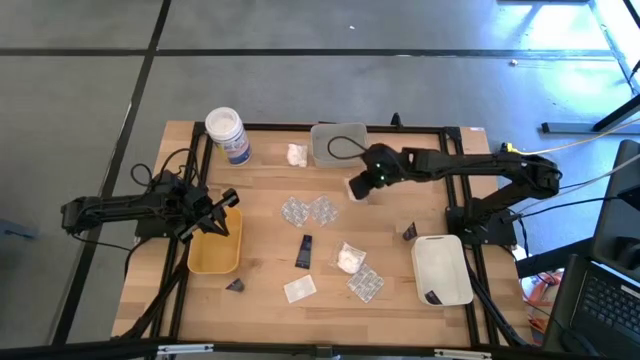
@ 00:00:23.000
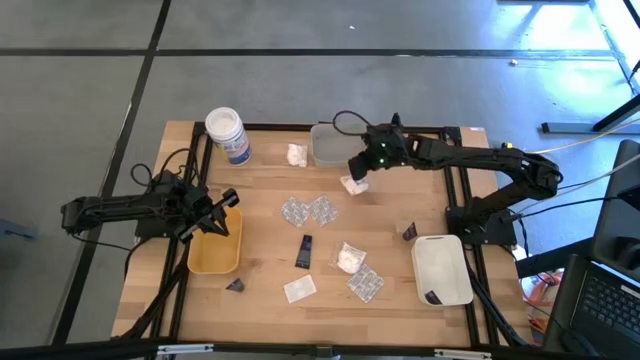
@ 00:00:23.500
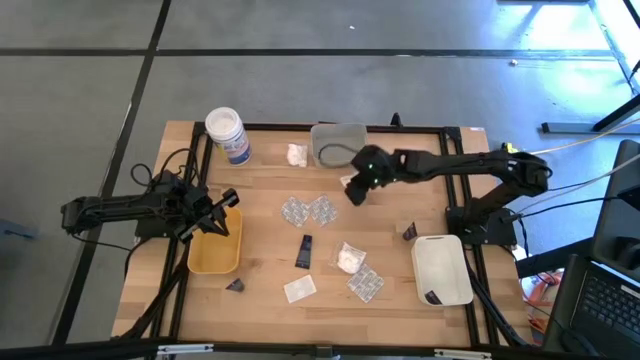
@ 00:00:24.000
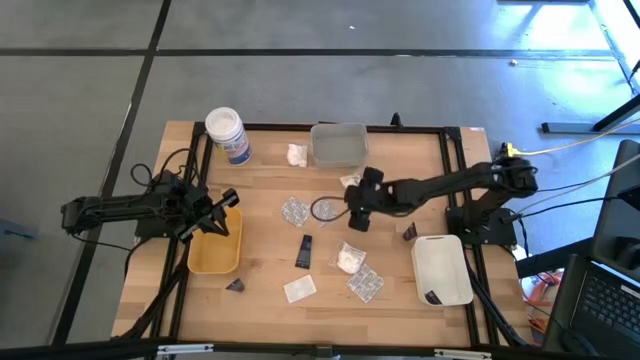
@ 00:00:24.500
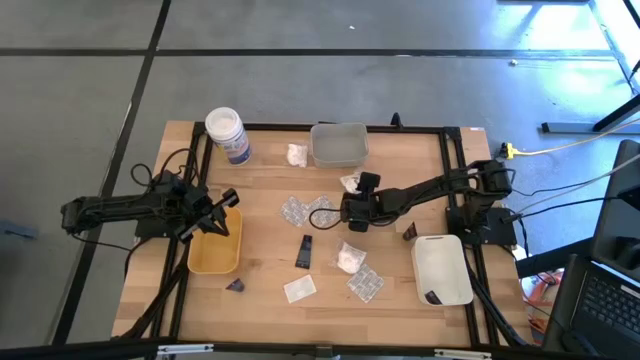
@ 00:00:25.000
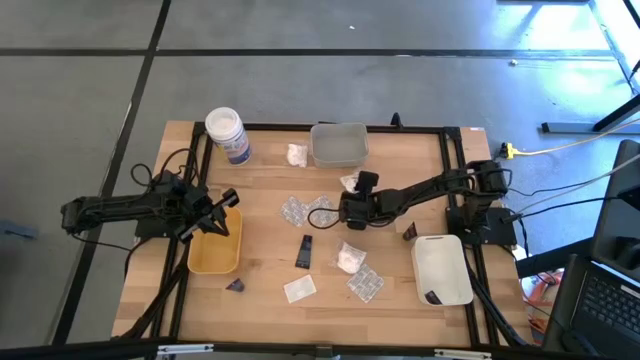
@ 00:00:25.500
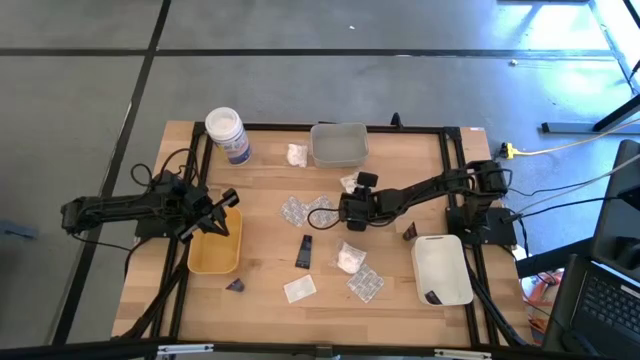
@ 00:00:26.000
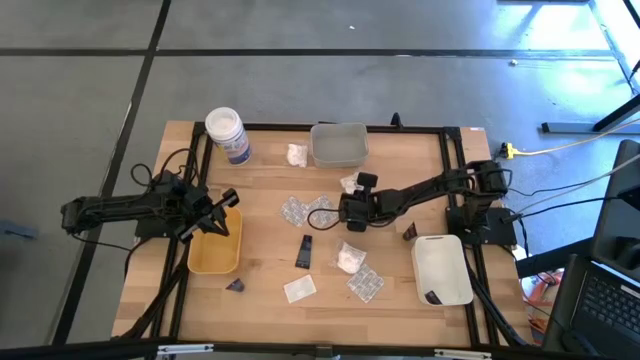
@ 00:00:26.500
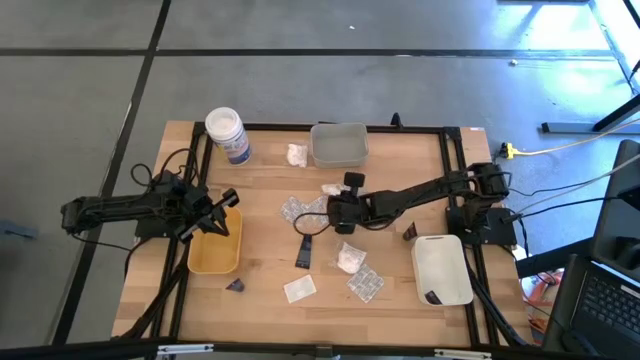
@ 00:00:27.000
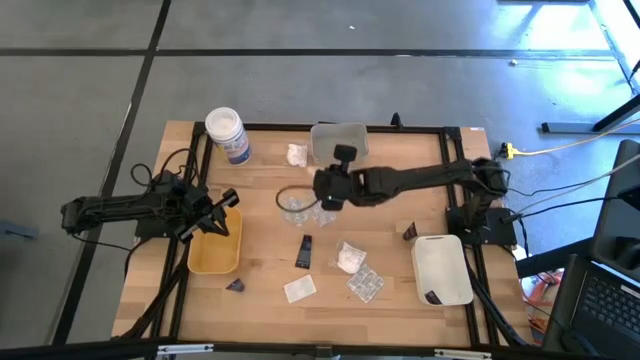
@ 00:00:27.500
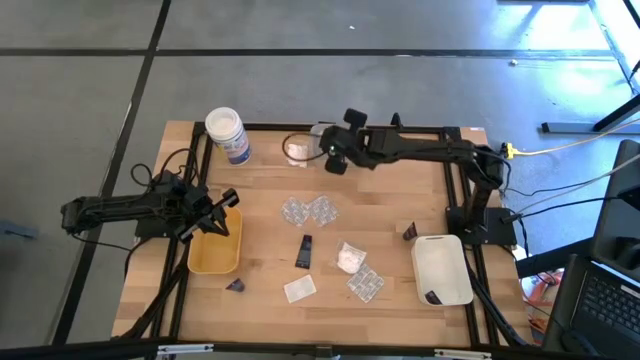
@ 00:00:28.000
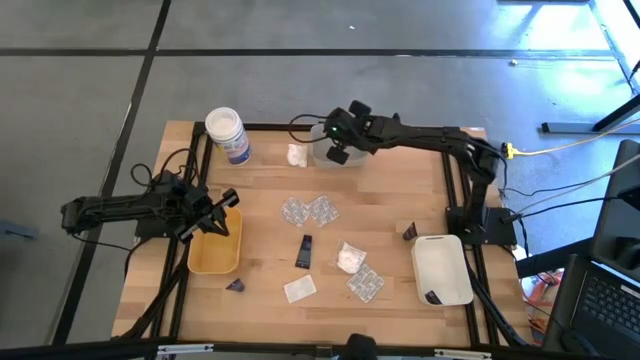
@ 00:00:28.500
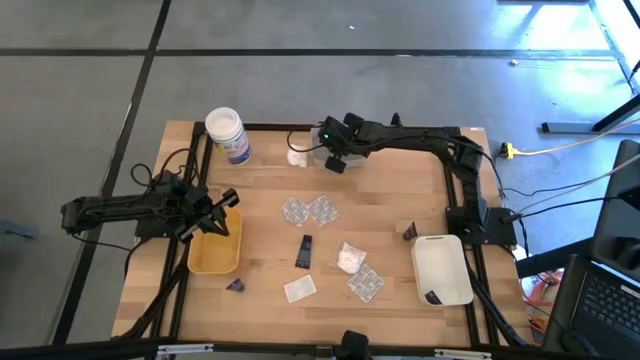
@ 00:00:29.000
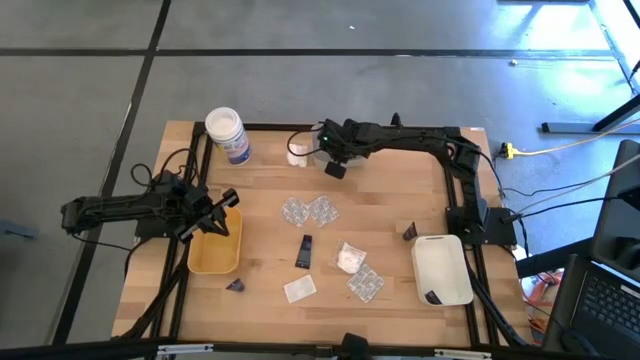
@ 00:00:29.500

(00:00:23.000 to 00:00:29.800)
Task: Pick & Place Travel size toiletries
Put the white cotton pack into the gray bin

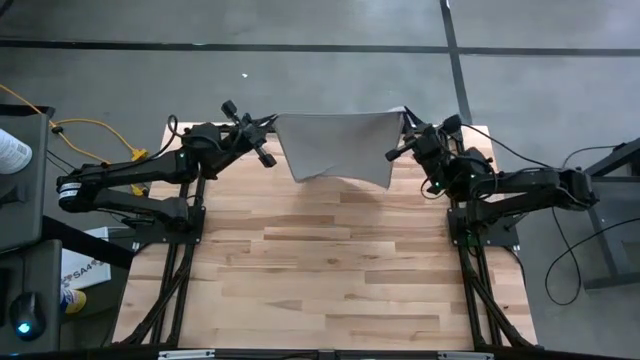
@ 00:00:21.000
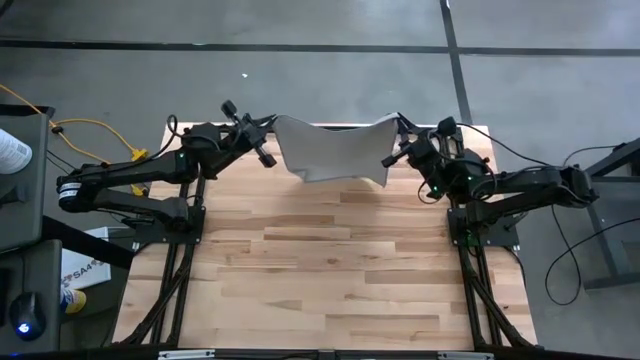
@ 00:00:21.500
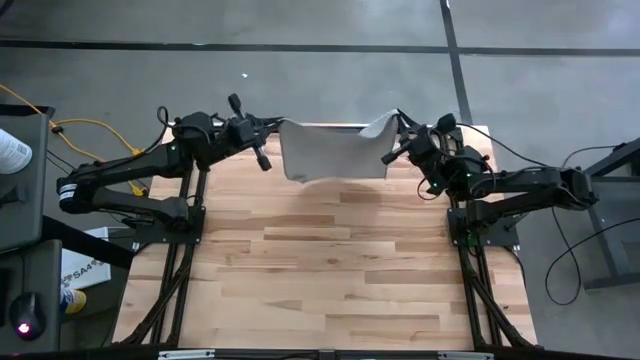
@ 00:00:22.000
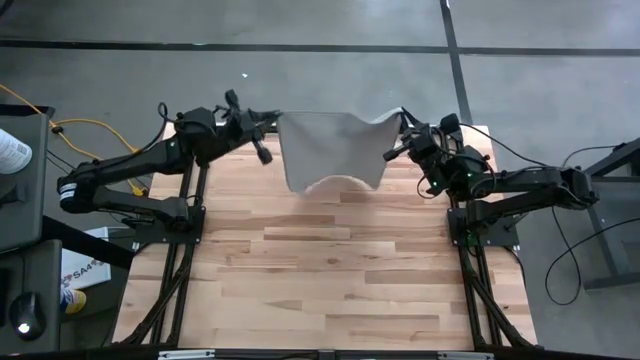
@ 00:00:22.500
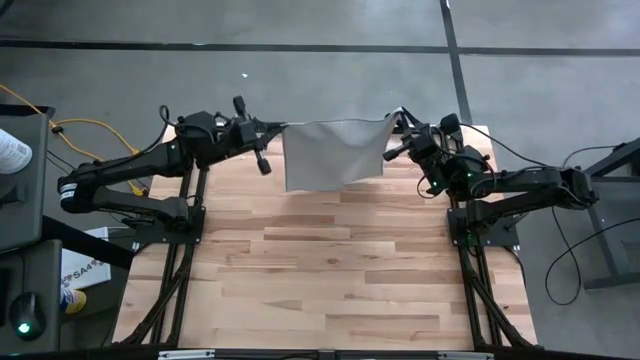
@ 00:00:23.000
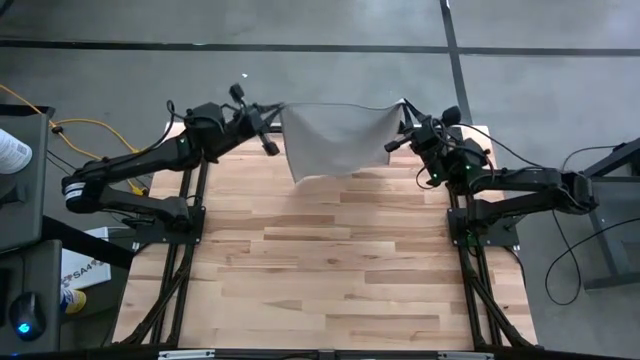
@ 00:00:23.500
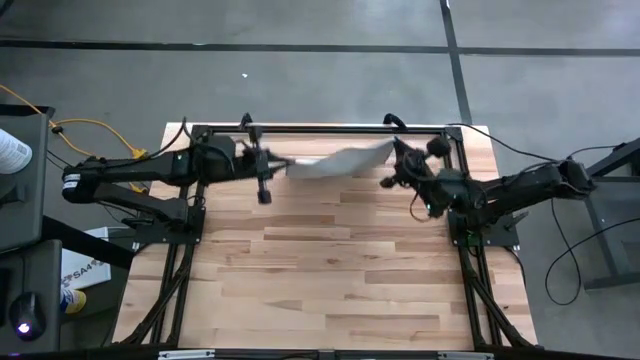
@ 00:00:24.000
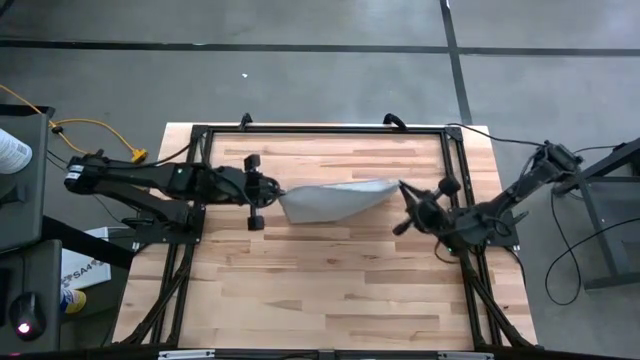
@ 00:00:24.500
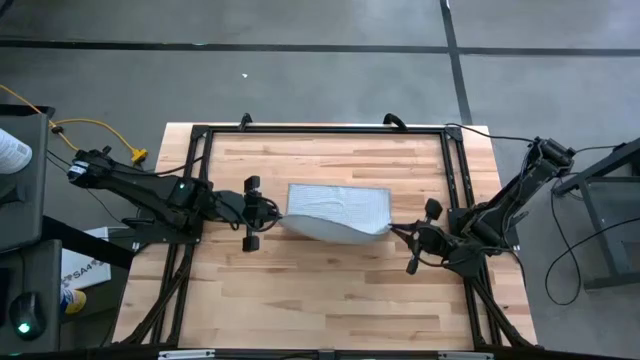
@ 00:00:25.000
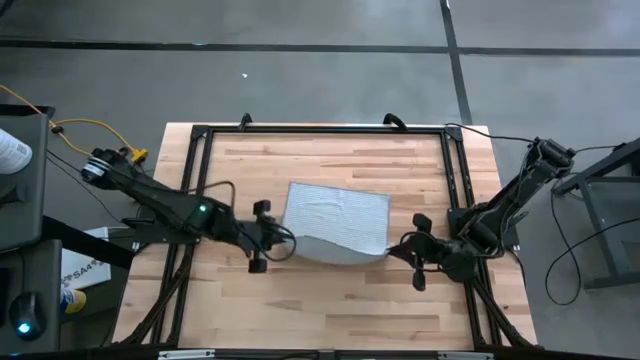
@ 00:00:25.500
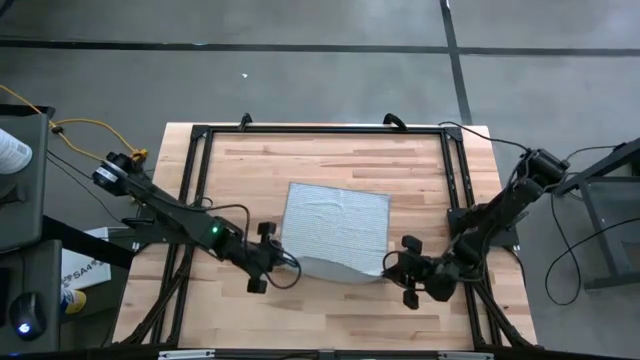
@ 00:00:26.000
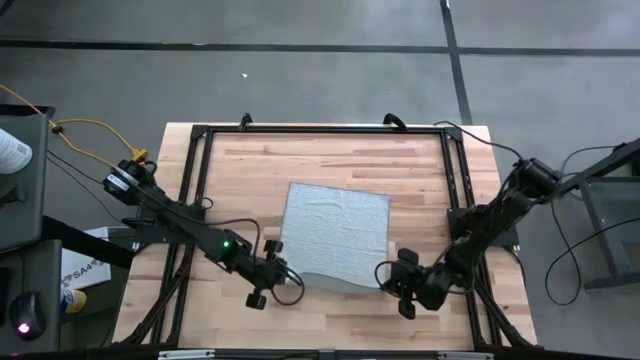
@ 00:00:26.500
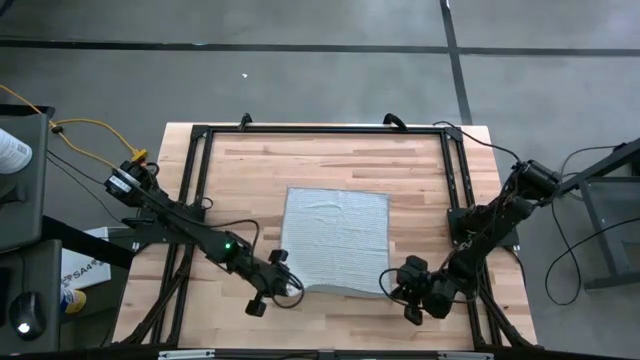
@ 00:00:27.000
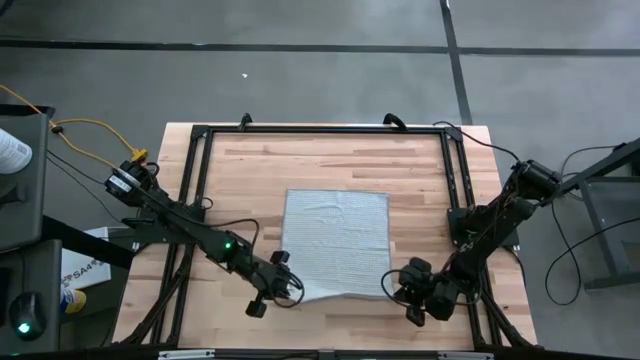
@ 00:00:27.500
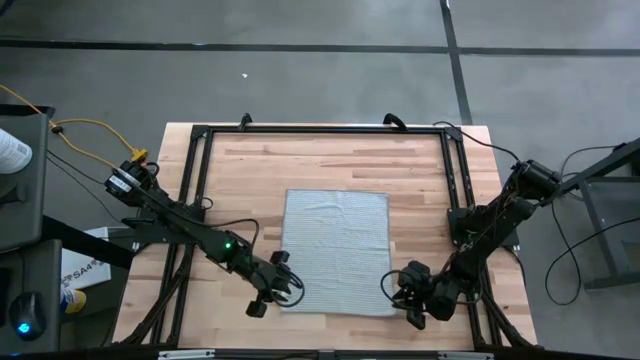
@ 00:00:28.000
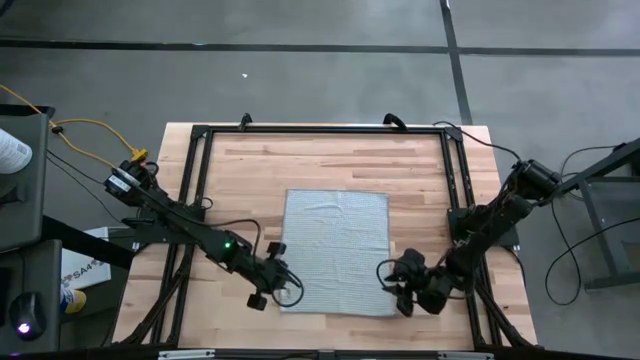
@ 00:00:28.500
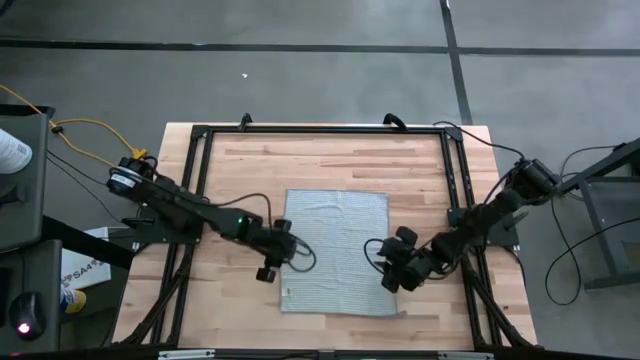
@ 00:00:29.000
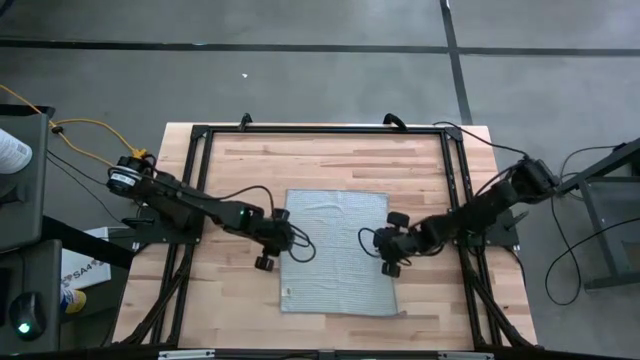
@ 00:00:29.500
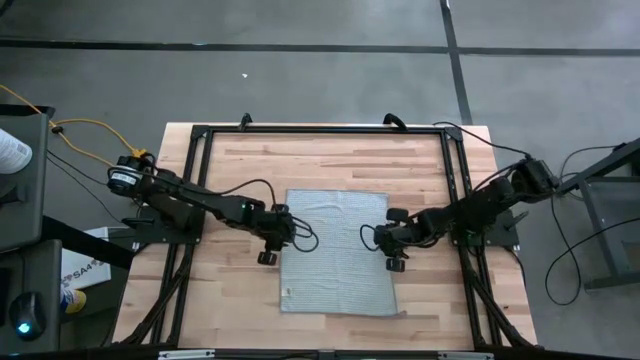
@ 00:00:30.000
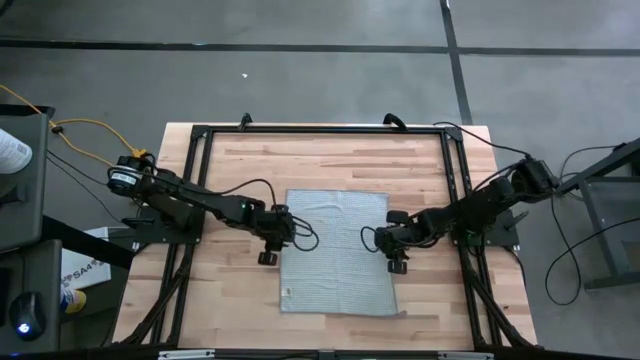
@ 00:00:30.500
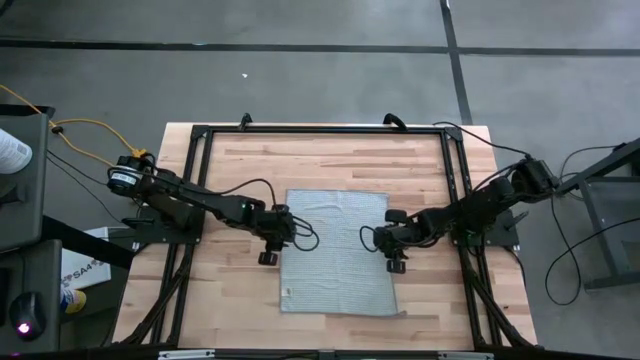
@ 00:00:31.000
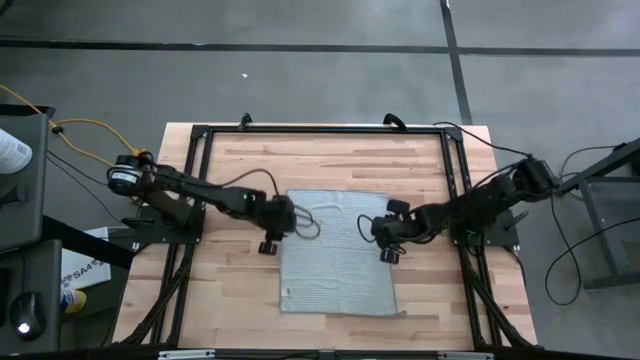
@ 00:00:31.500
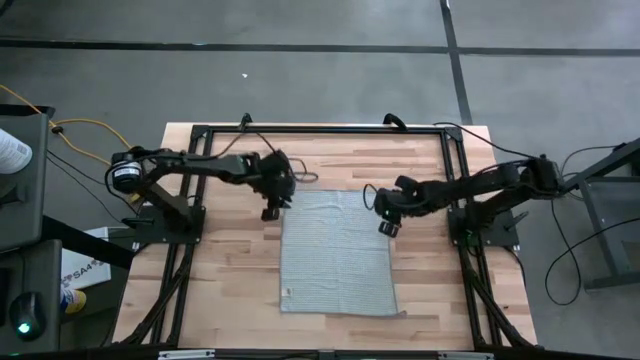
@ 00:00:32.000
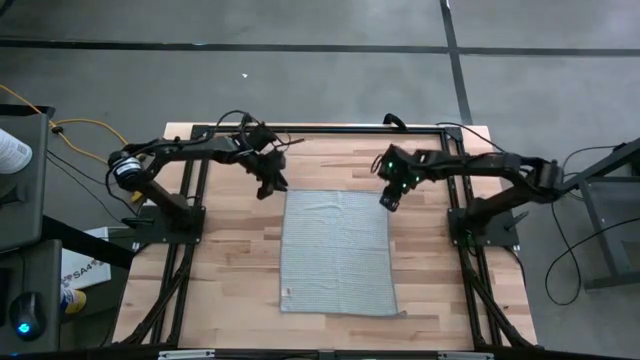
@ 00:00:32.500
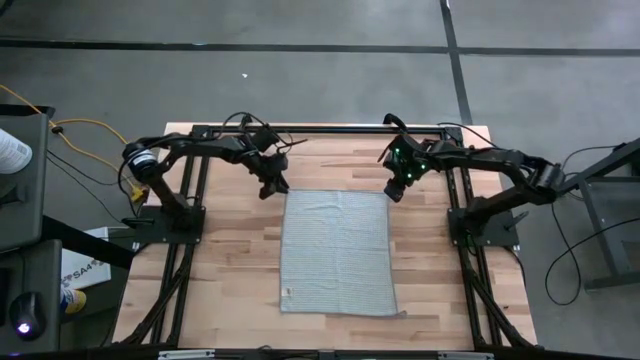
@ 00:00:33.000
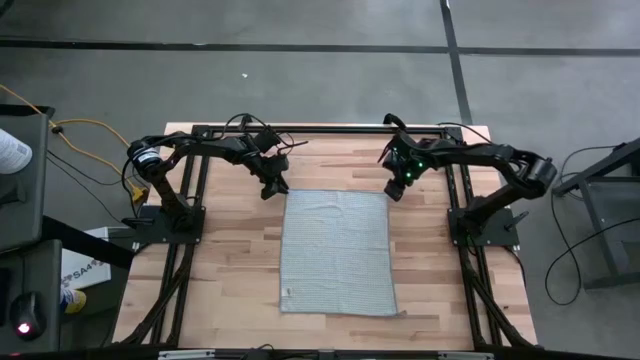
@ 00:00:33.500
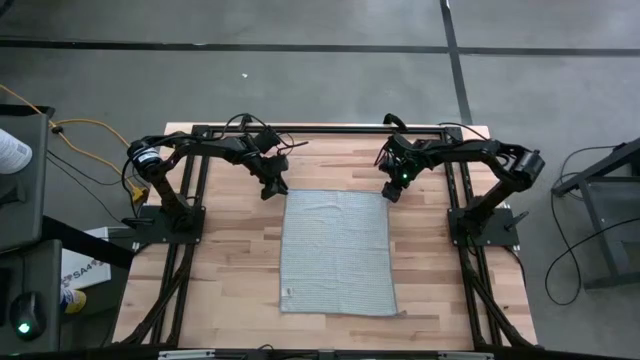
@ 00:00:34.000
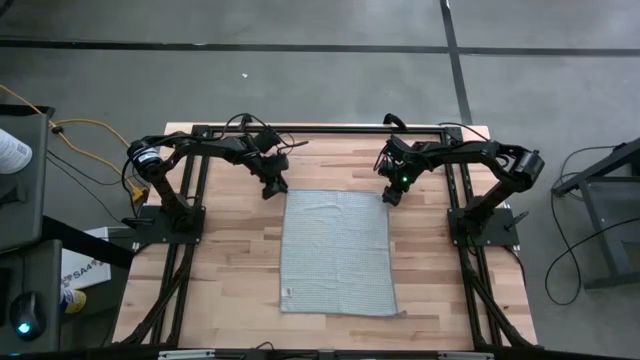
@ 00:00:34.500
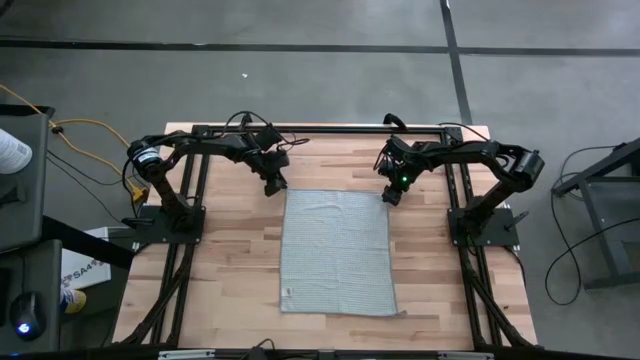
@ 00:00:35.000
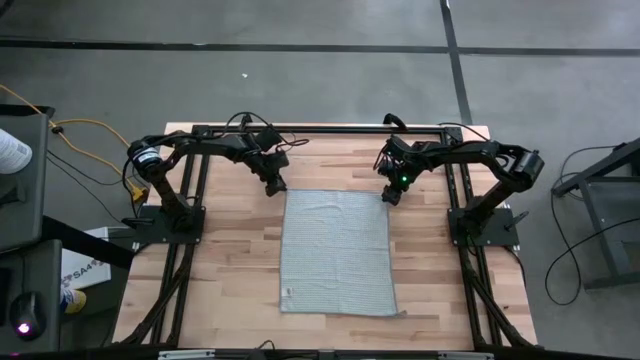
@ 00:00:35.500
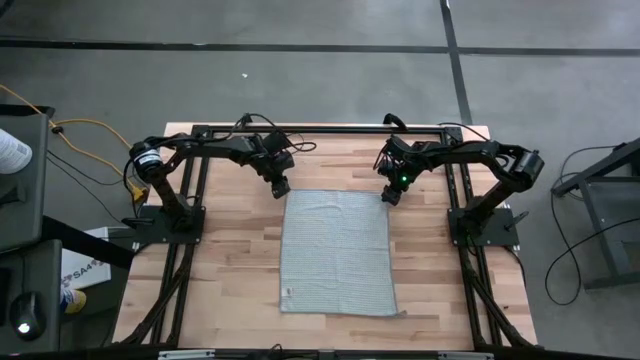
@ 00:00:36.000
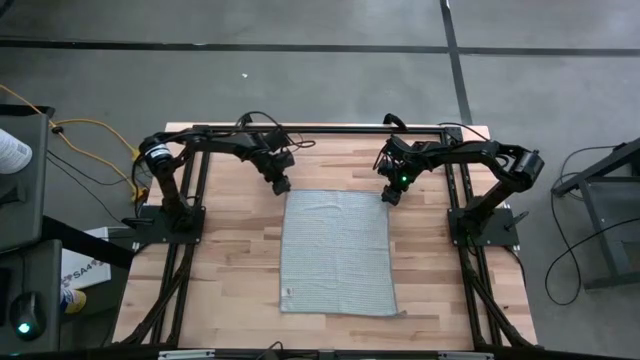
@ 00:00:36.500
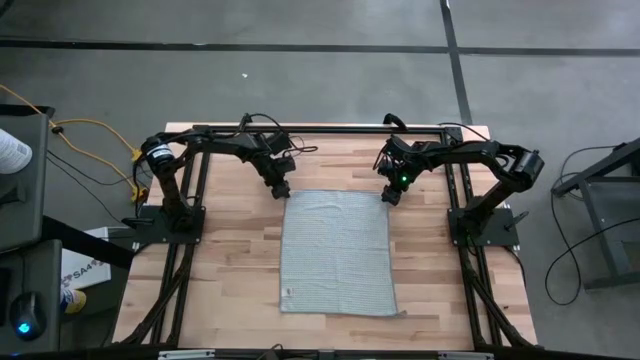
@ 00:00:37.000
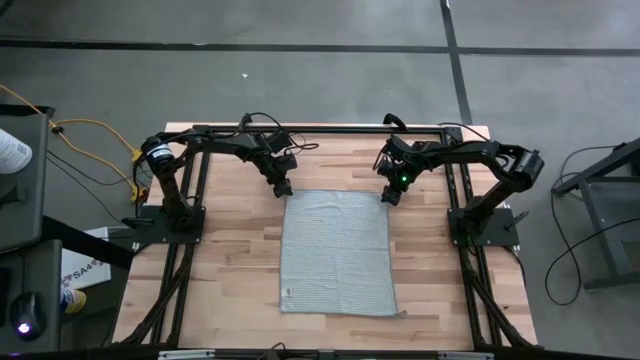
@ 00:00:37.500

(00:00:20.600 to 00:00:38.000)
Task: Fold microfiber towels
Fold the gray microfiber towel
